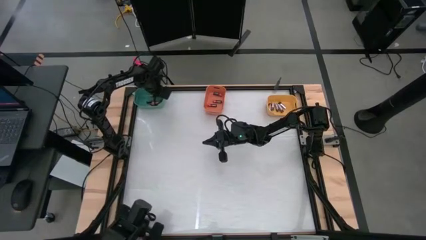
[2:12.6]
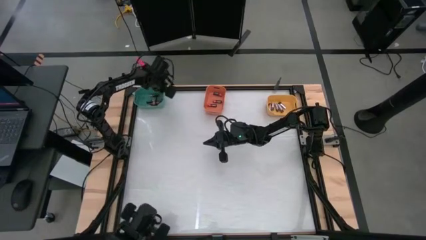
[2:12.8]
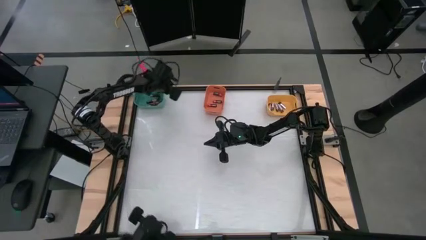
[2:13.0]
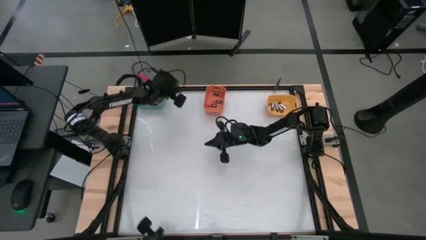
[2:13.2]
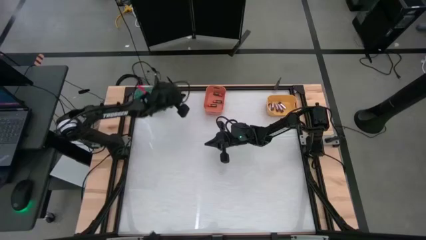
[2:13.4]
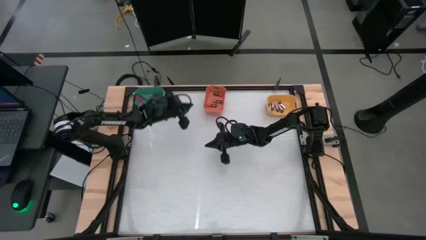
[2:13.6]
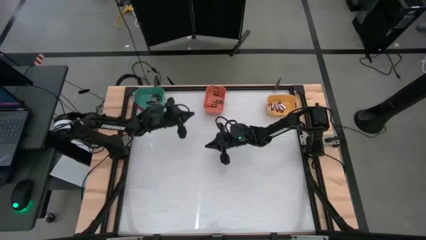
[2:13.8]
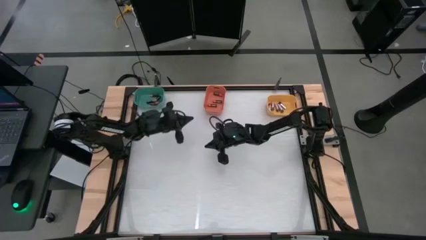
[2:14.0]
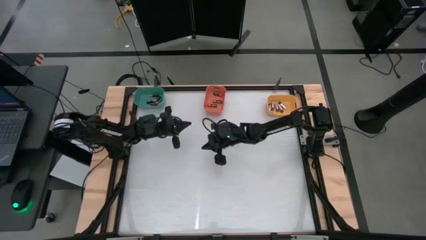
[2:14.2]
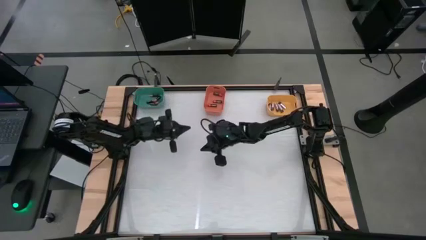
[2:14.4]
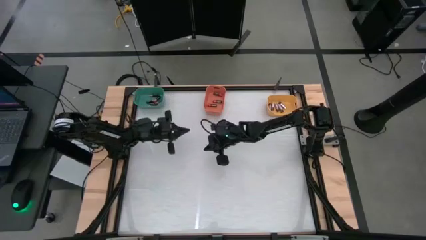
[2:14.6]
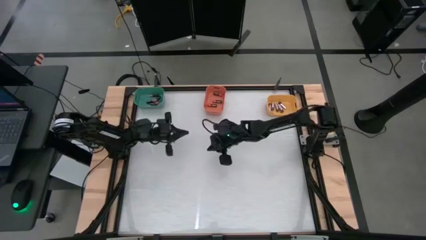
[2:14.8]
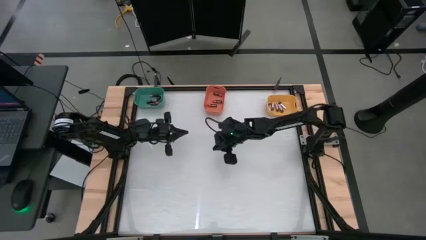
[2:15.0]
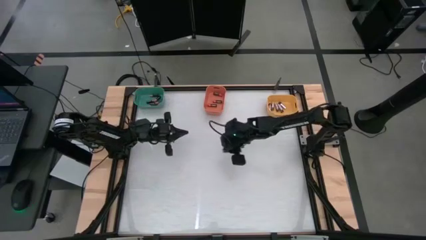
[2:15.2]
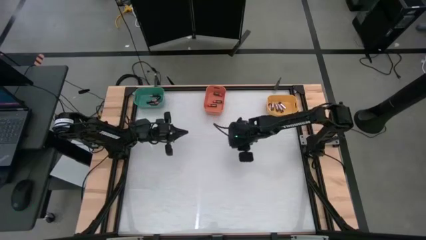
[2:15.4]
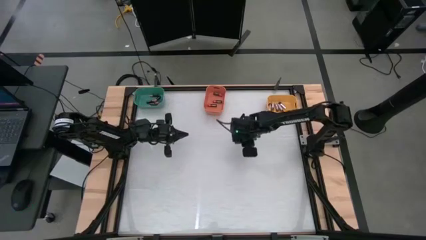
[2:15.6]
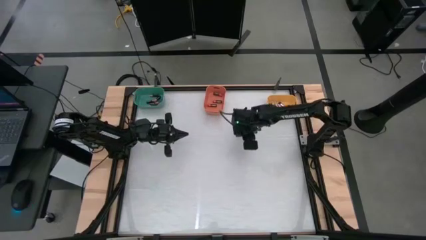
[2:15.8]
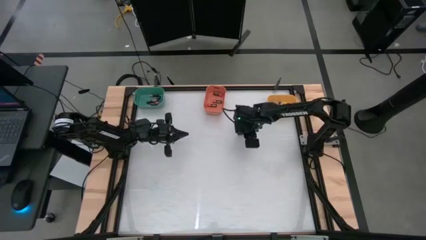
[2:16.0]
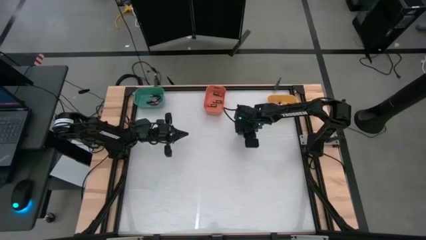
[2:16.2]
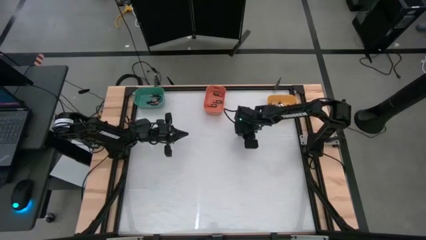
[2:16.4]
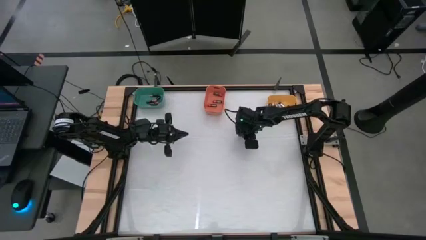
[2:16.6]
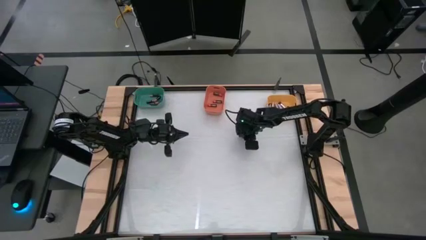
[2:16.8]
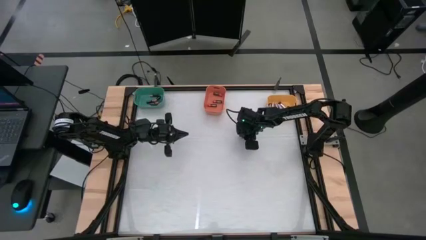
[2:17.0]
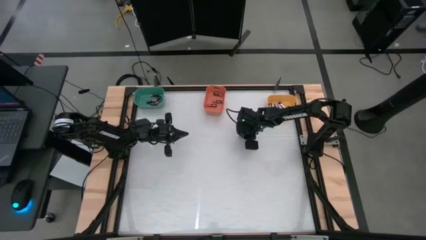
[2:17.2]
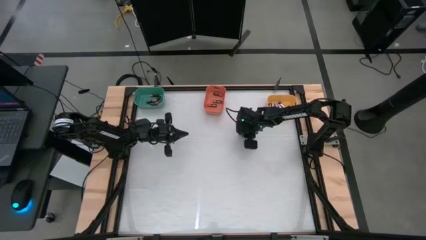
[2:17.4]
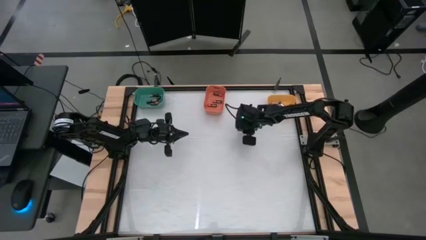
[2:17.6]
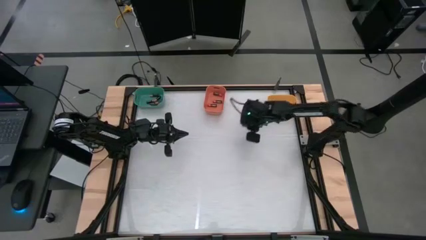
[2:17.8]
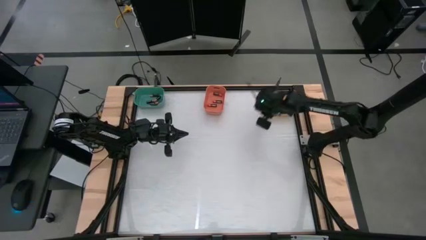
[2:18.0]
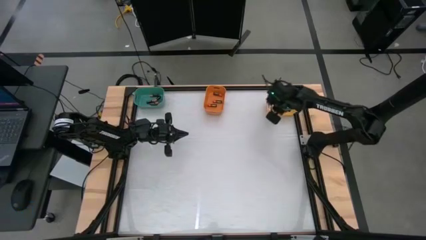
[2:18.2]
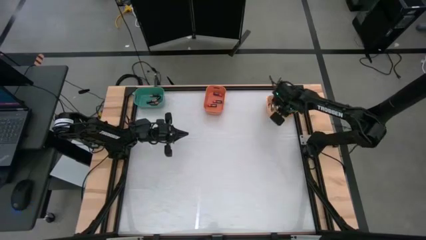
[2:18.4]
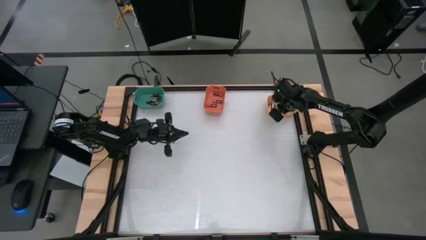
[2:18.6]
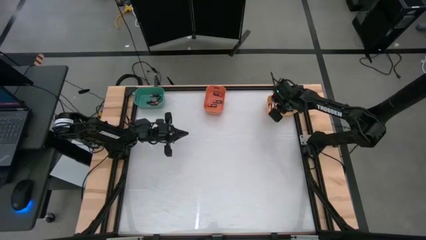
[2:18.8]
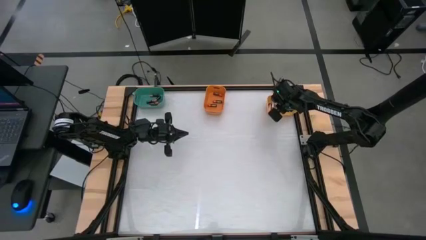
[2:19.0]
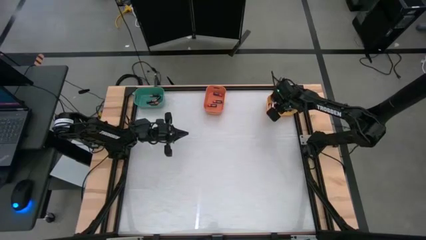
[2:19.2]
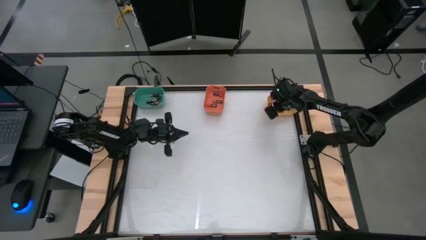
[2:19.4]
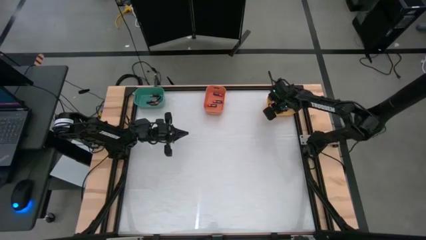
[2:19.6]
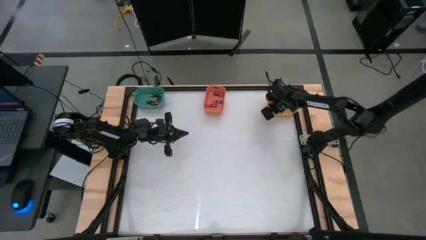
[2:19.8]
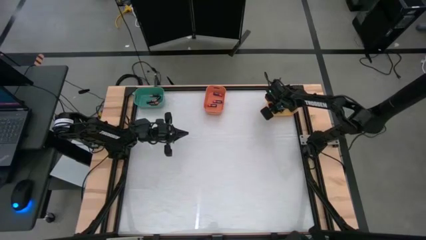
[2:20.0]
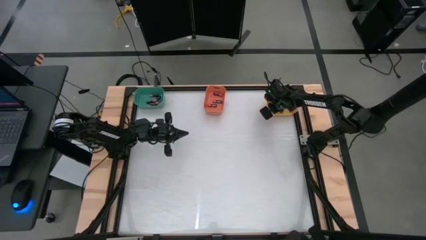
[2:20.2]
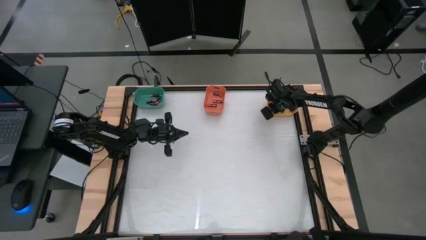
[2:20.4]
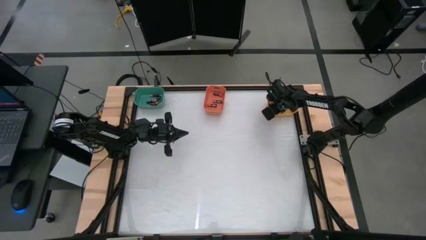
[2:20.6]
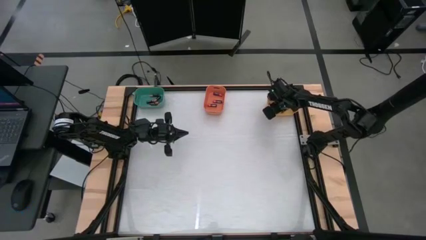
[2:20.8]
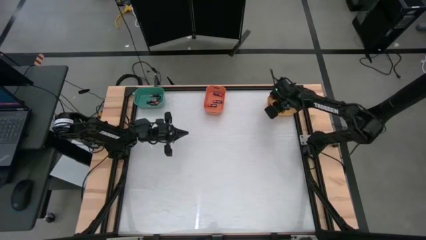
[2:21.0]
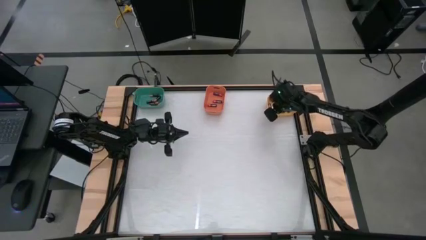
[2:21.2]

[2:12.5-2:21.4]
Task: Sort batteries
Put the silver battery into the yellow container

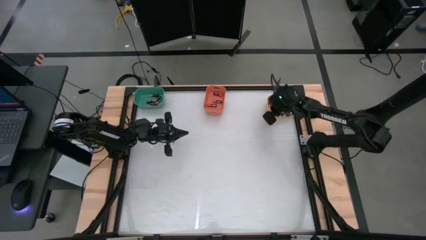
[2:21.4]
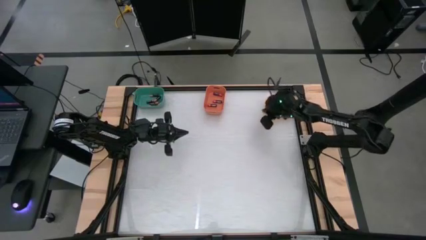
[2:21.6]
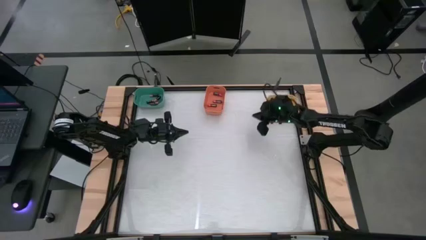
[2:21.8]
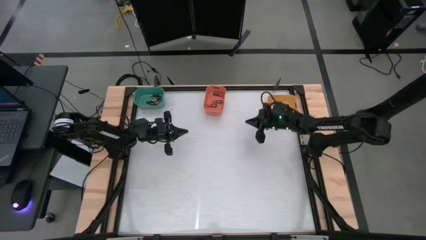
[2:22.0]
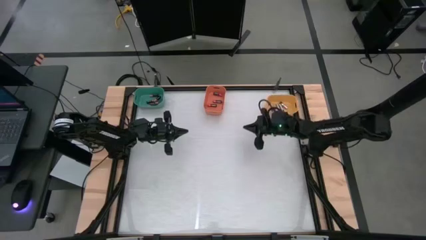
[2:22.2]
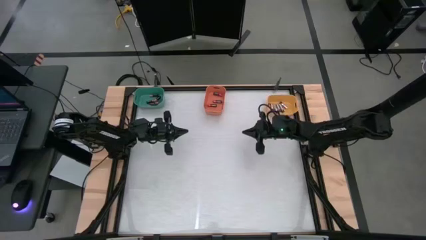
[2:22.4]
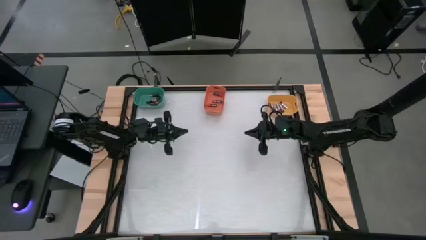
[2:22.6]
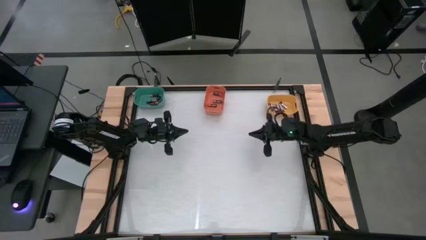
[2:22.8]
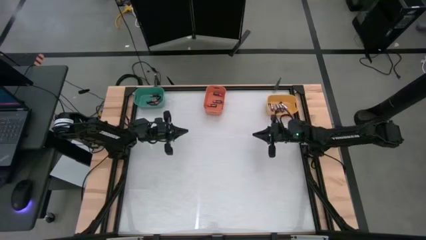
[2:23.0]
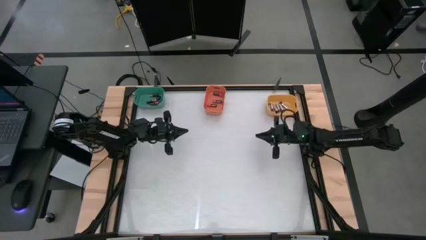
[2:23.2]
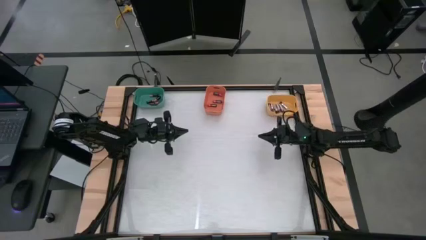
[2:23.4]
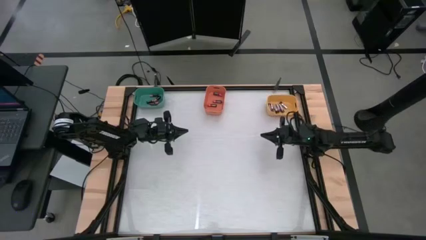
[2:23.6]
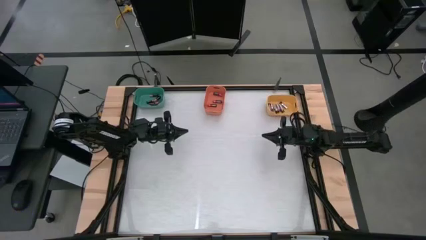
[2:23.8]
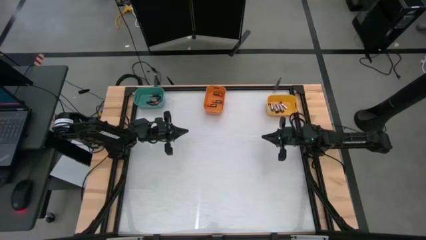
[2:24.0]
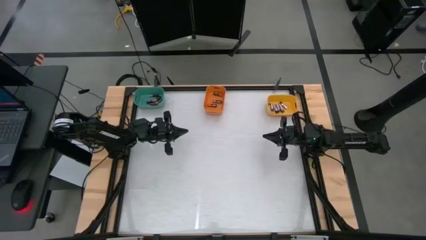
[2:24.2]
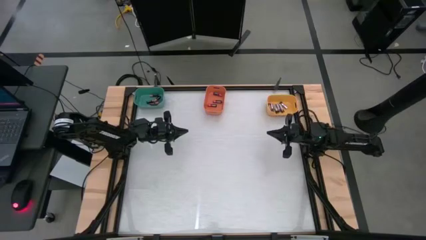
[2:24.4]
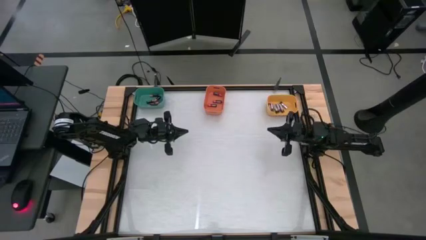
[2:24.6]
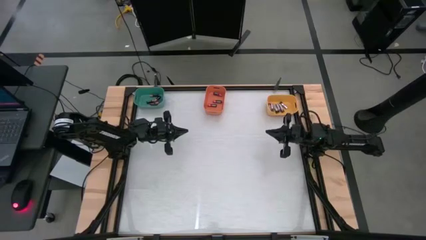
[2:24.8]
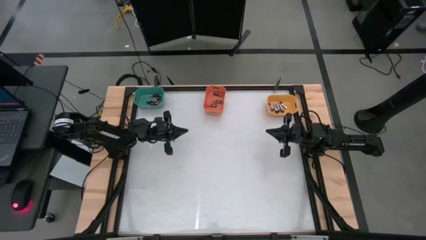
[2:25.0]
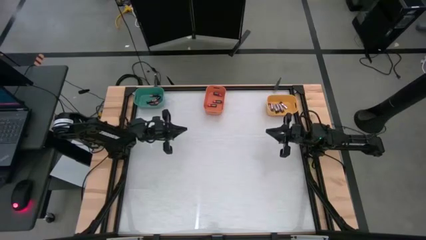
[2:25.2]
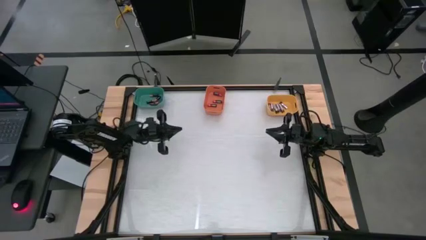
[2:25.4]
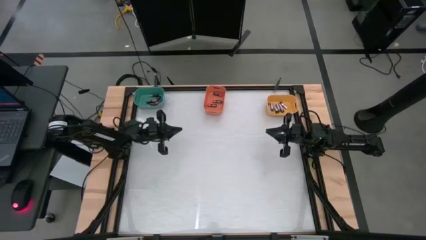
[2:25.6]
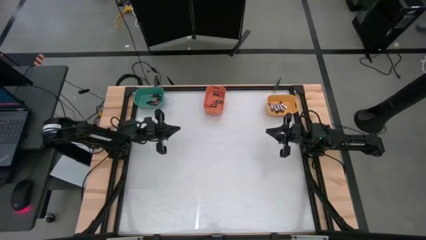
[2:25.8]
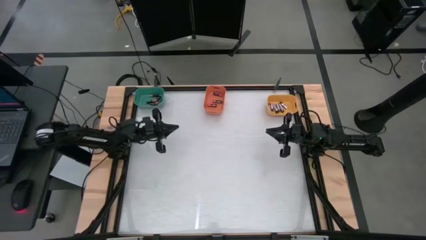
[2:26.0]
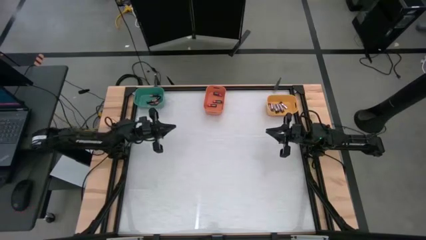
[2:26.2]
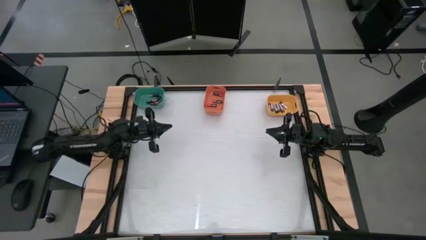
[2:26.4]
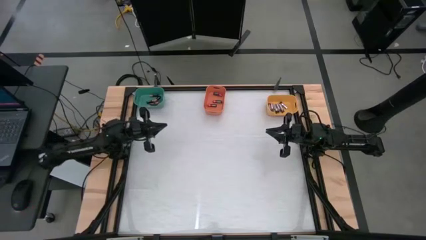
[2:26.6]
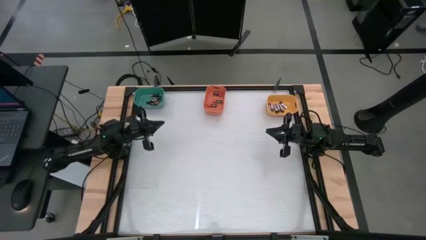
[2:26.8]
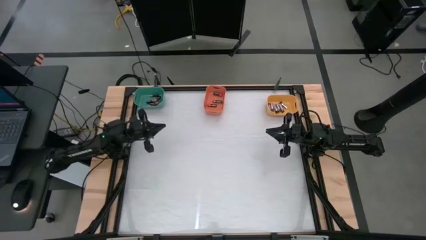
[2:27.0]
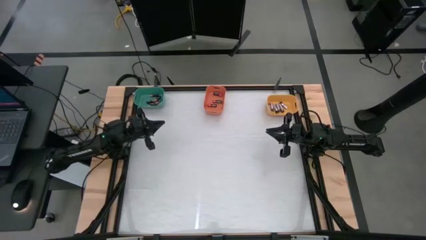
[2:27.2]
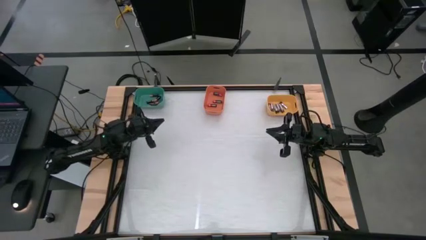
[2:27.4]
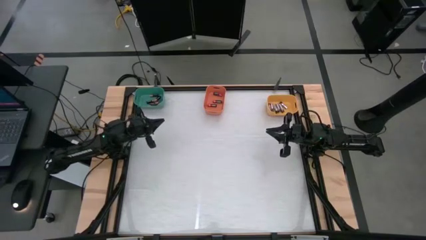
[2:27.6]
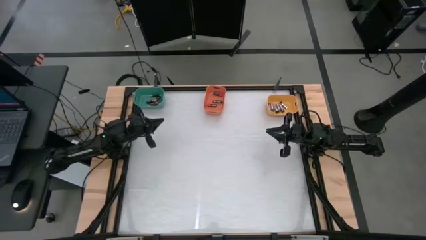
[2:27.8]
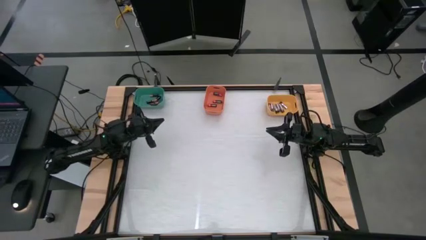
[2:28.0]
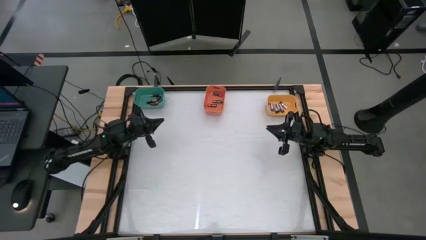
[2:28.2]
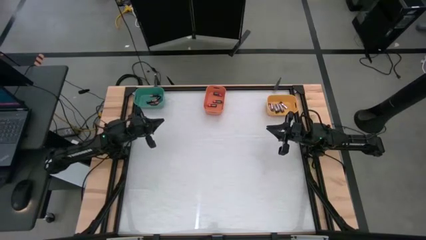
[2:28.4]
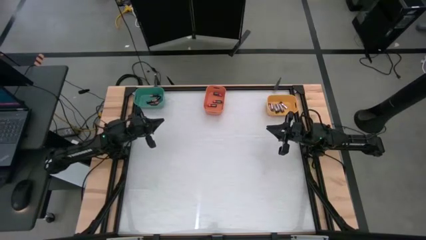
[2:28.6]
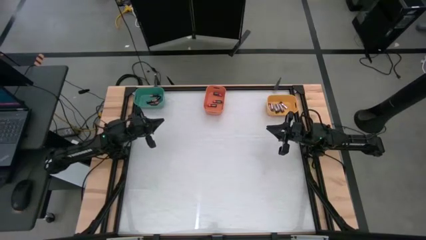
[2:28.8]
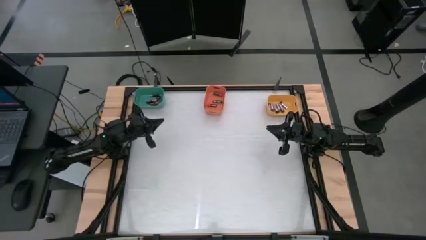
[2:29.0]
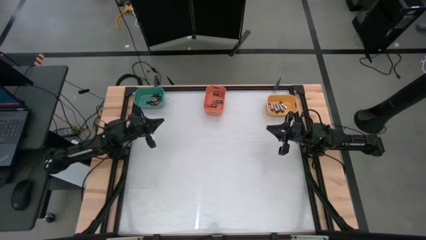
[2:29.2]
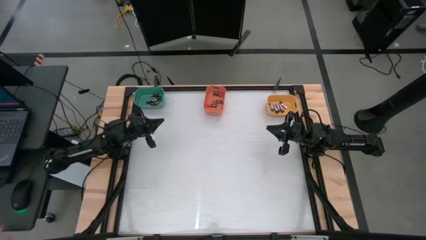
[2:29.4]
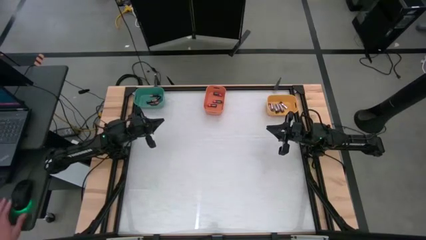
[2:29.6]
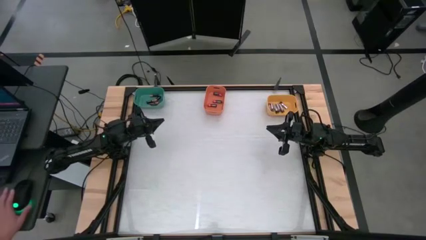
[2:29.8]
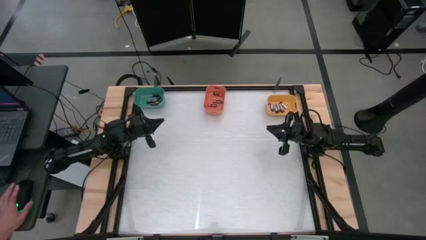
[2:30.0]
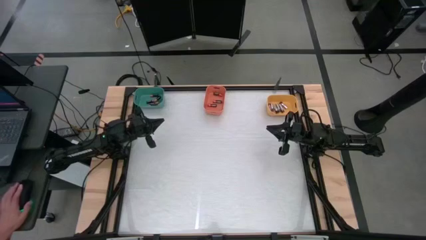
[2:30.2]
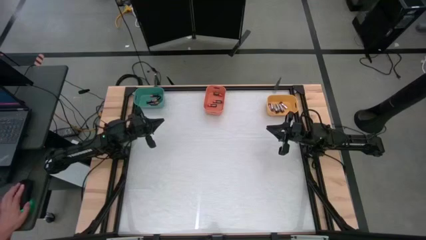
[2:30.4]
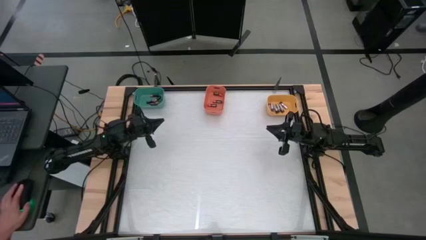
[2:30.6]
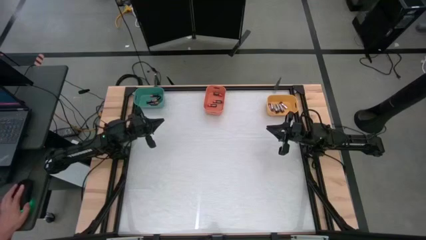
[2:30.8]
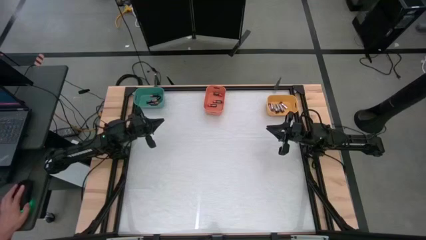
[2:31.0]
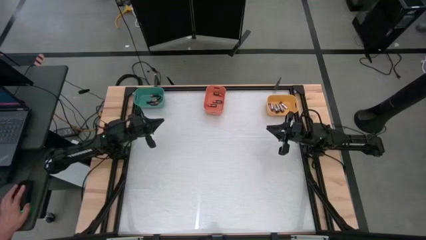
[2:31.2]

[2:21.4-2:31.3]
Return to Home Position
